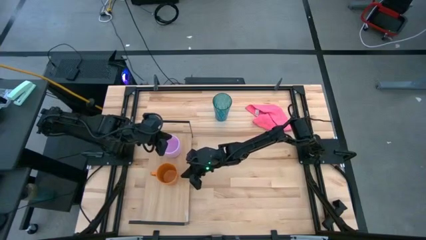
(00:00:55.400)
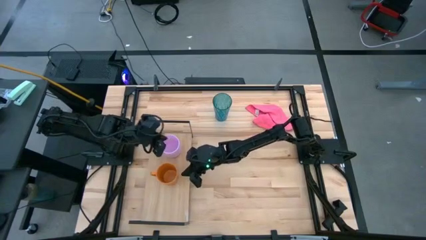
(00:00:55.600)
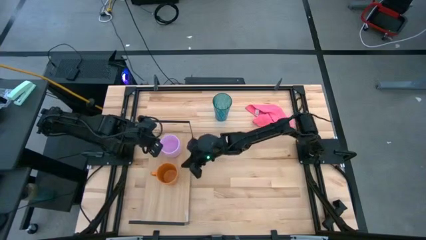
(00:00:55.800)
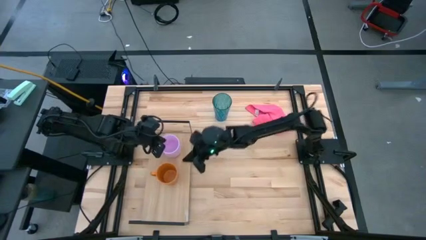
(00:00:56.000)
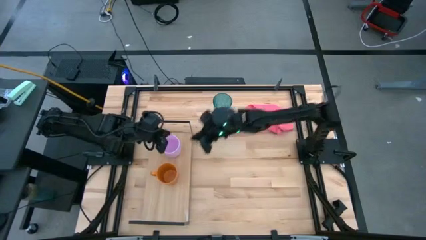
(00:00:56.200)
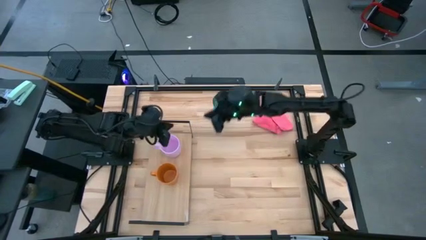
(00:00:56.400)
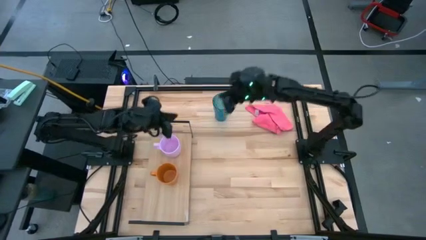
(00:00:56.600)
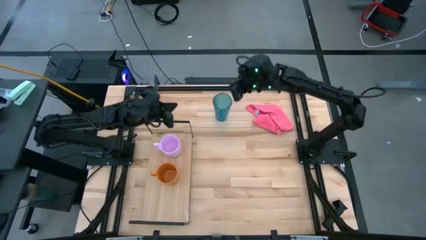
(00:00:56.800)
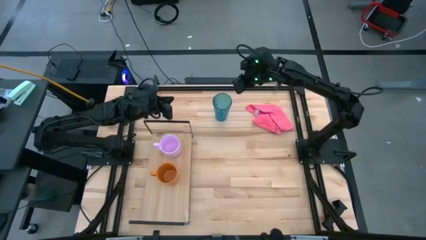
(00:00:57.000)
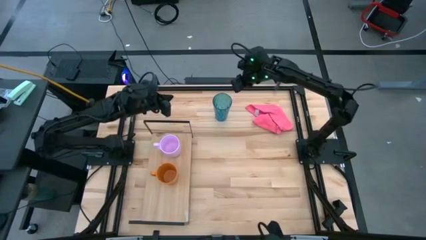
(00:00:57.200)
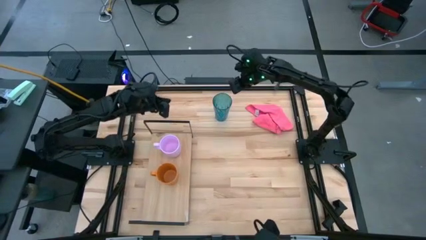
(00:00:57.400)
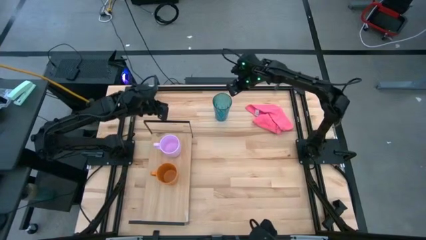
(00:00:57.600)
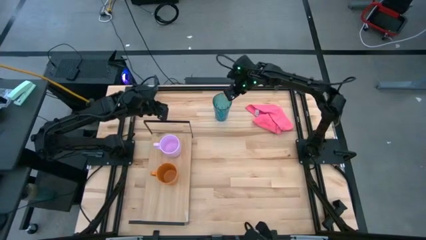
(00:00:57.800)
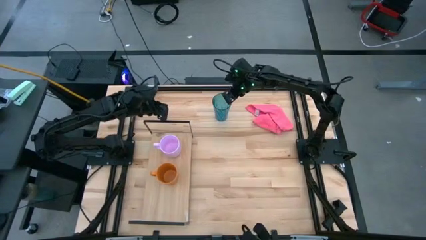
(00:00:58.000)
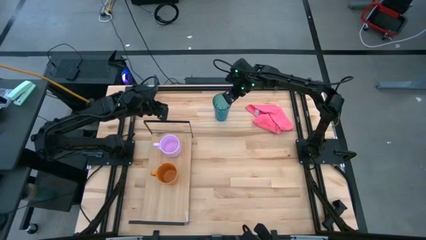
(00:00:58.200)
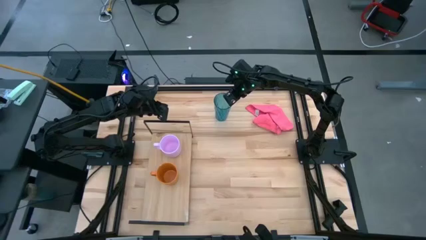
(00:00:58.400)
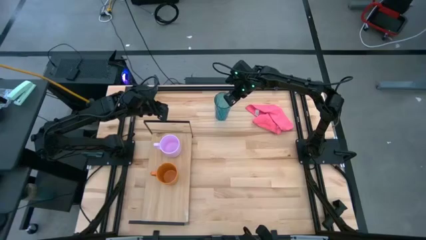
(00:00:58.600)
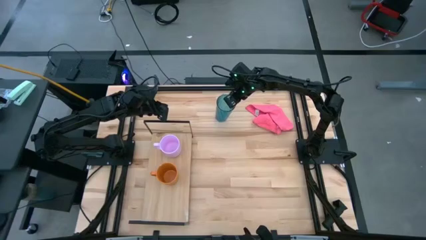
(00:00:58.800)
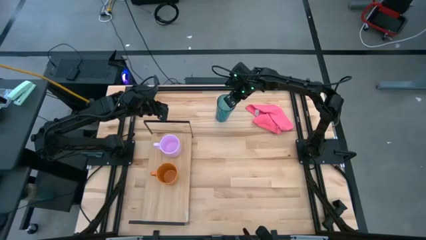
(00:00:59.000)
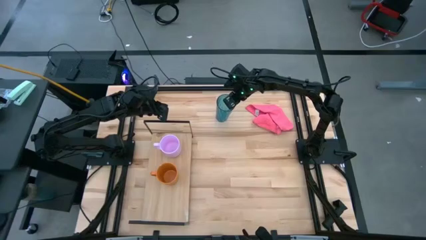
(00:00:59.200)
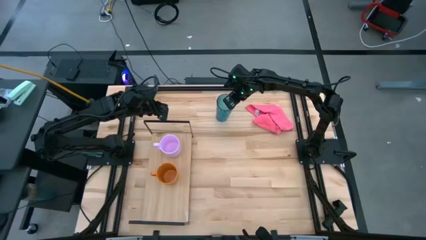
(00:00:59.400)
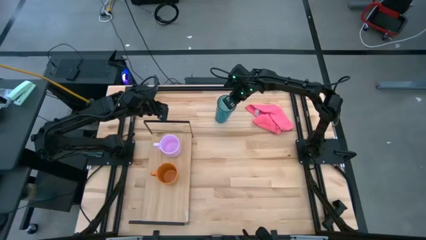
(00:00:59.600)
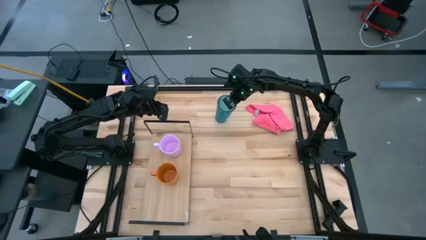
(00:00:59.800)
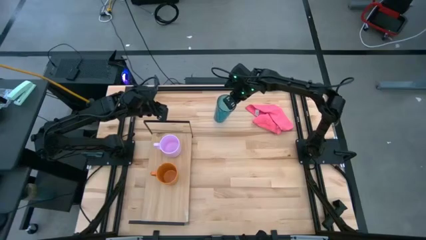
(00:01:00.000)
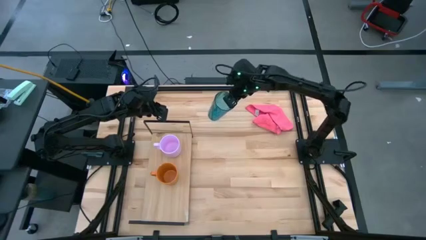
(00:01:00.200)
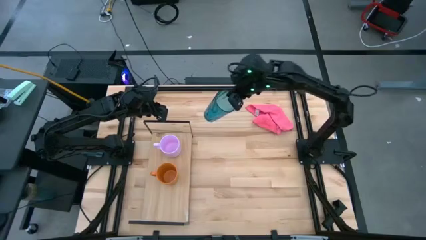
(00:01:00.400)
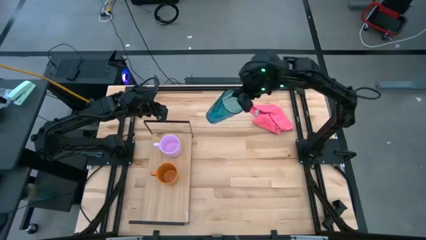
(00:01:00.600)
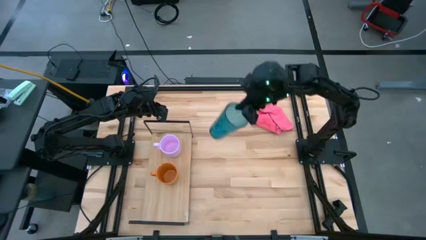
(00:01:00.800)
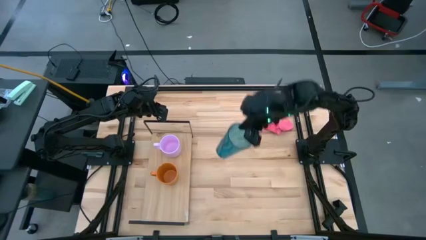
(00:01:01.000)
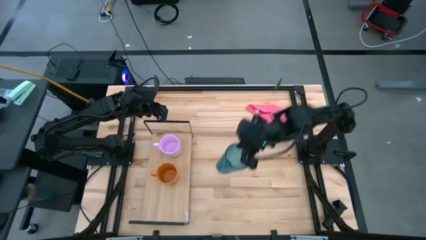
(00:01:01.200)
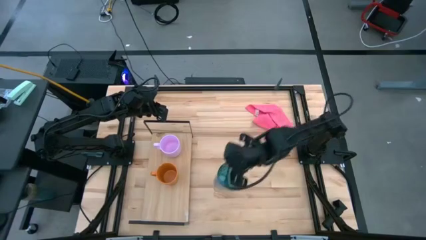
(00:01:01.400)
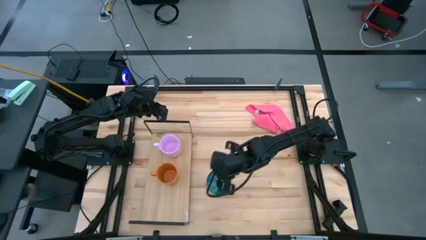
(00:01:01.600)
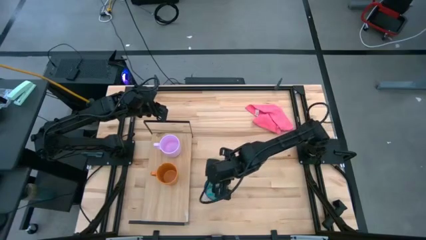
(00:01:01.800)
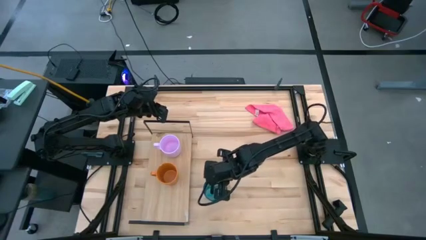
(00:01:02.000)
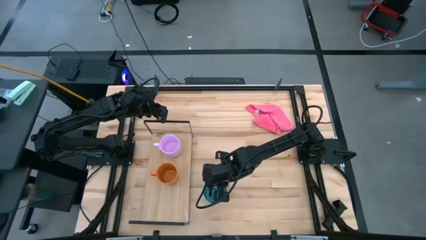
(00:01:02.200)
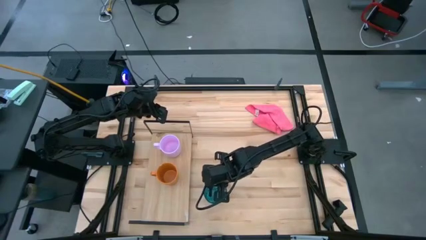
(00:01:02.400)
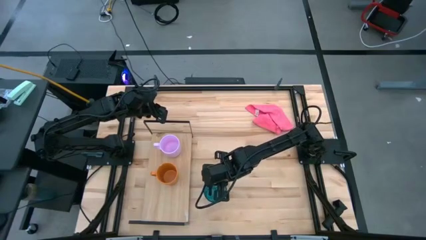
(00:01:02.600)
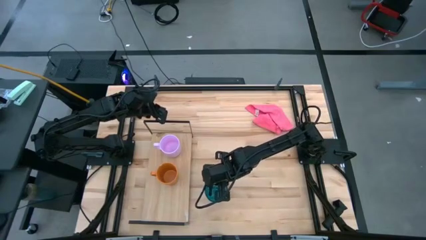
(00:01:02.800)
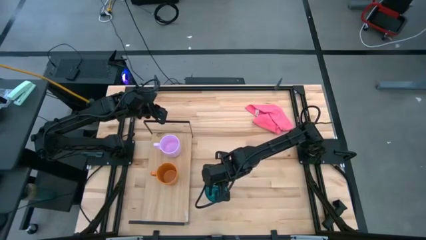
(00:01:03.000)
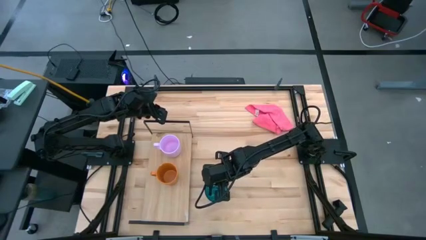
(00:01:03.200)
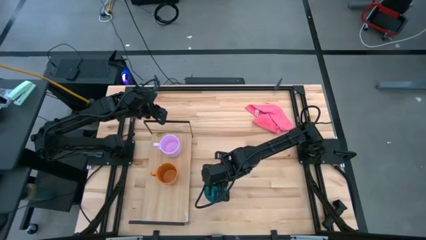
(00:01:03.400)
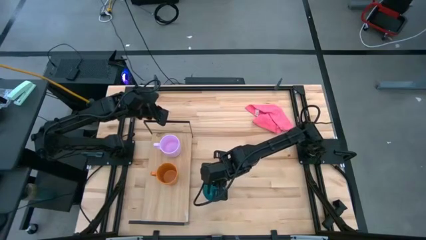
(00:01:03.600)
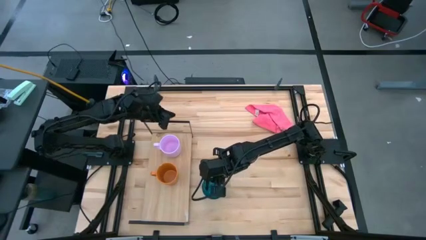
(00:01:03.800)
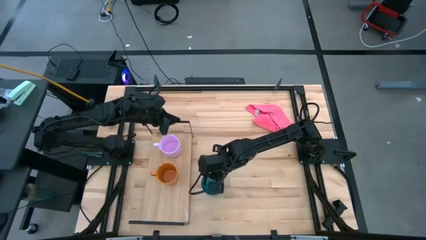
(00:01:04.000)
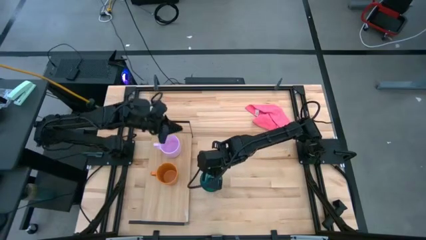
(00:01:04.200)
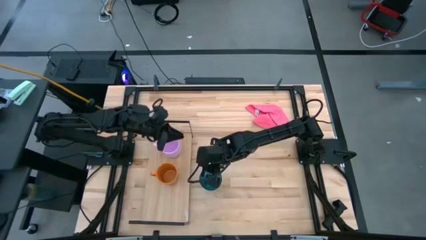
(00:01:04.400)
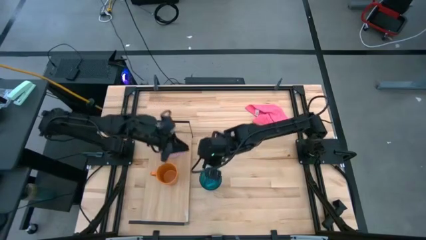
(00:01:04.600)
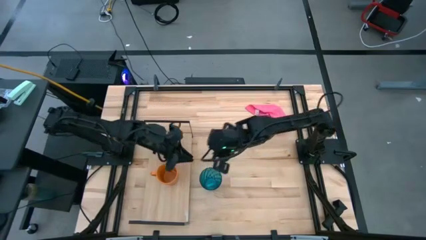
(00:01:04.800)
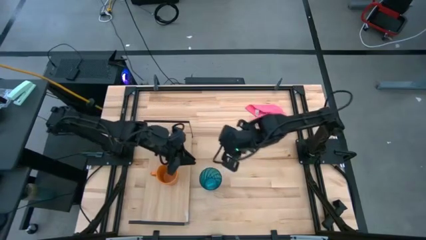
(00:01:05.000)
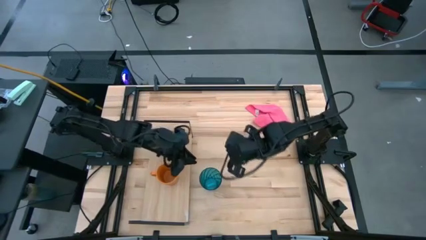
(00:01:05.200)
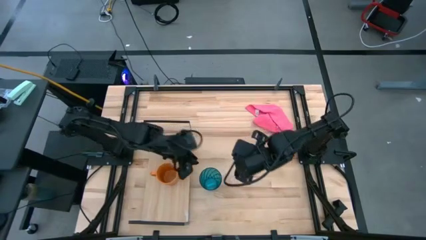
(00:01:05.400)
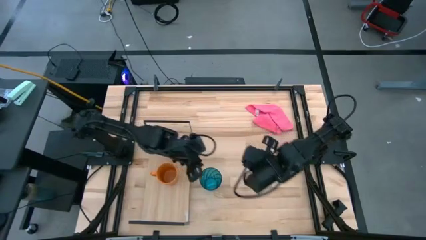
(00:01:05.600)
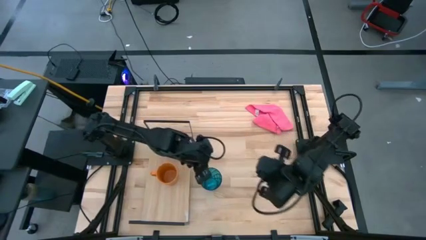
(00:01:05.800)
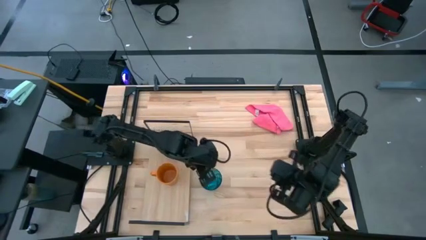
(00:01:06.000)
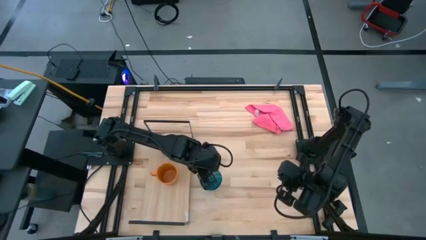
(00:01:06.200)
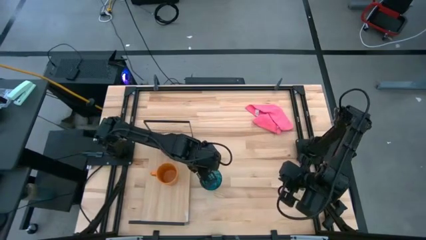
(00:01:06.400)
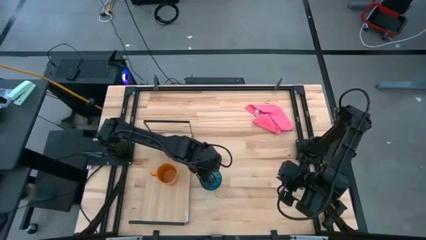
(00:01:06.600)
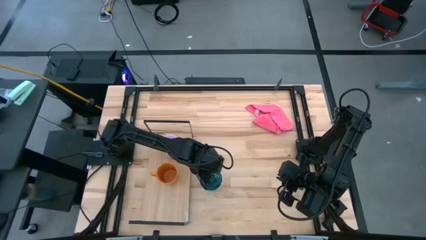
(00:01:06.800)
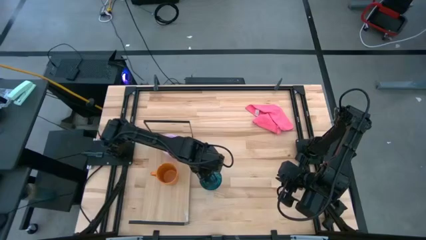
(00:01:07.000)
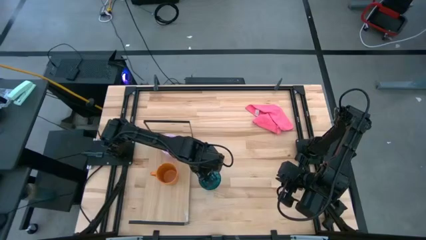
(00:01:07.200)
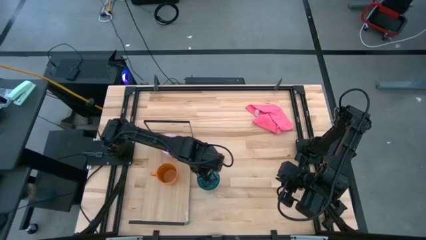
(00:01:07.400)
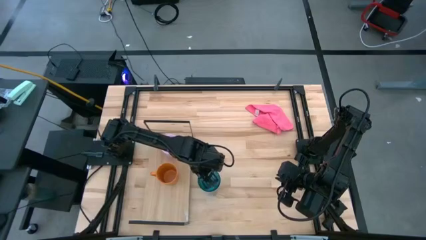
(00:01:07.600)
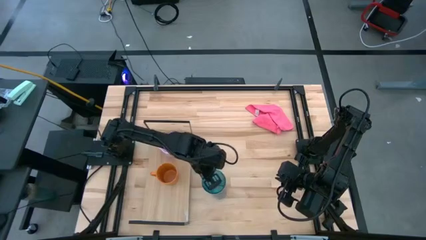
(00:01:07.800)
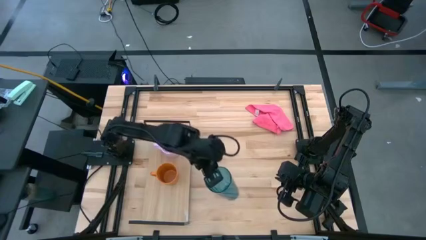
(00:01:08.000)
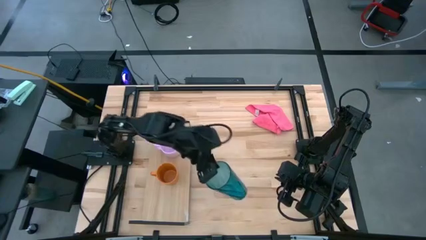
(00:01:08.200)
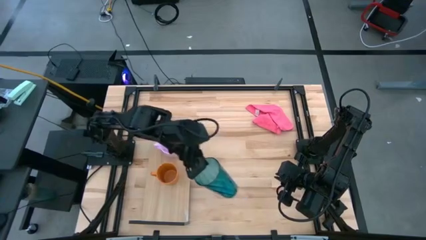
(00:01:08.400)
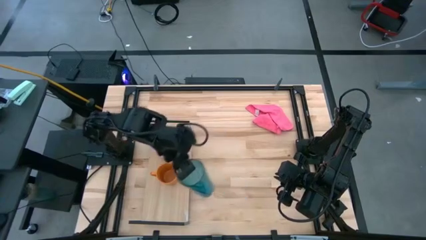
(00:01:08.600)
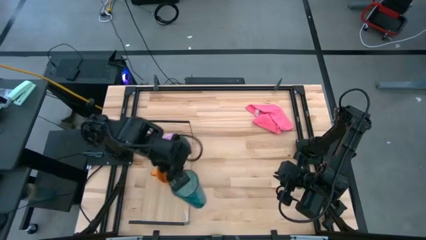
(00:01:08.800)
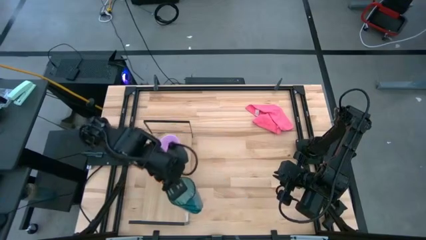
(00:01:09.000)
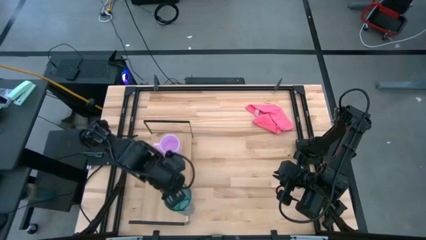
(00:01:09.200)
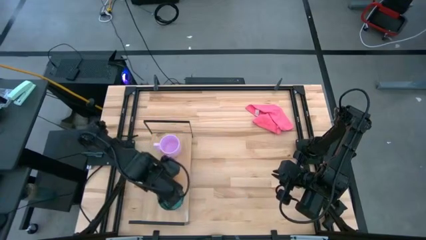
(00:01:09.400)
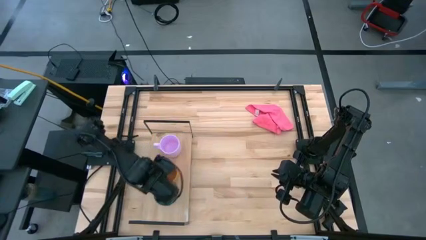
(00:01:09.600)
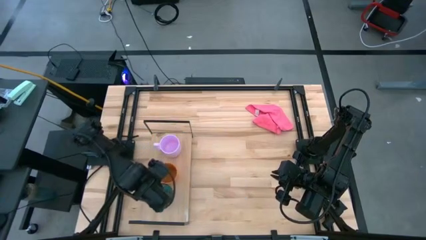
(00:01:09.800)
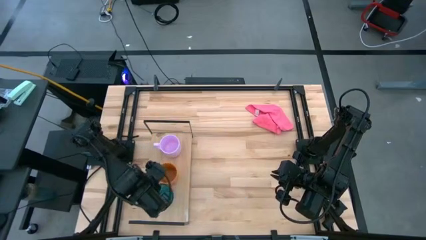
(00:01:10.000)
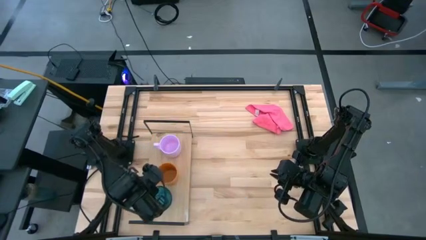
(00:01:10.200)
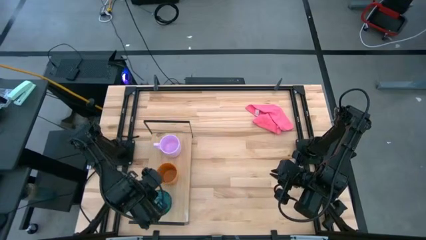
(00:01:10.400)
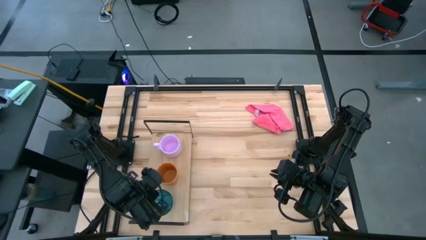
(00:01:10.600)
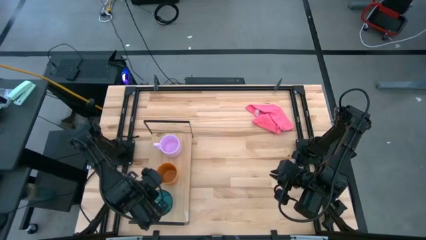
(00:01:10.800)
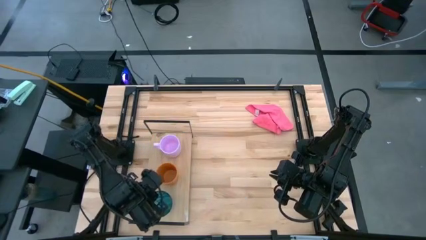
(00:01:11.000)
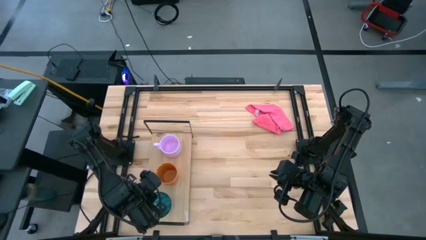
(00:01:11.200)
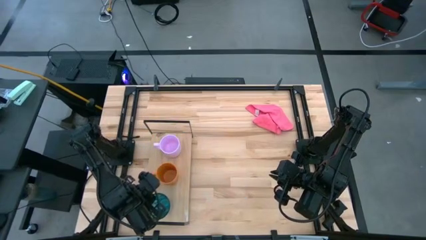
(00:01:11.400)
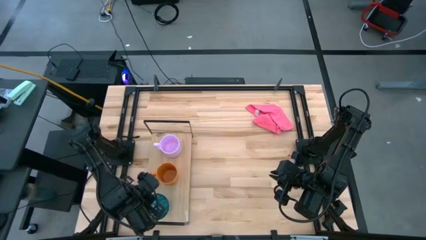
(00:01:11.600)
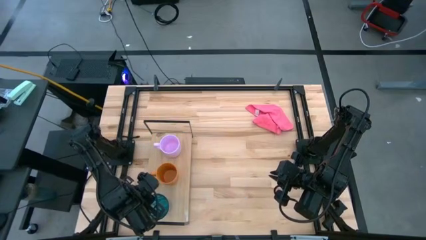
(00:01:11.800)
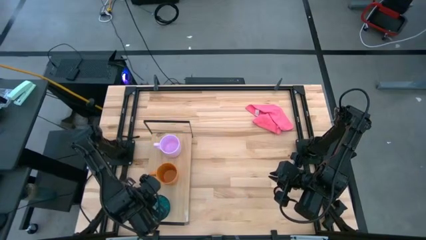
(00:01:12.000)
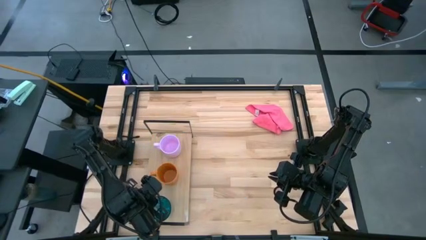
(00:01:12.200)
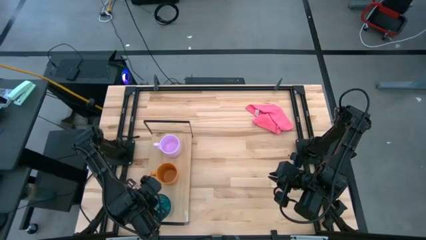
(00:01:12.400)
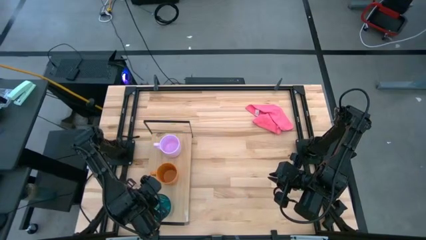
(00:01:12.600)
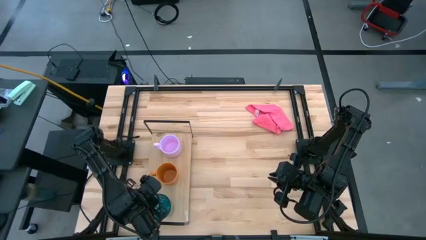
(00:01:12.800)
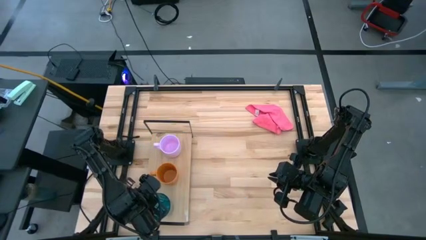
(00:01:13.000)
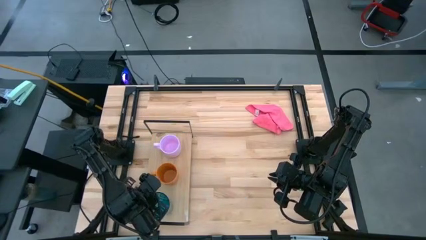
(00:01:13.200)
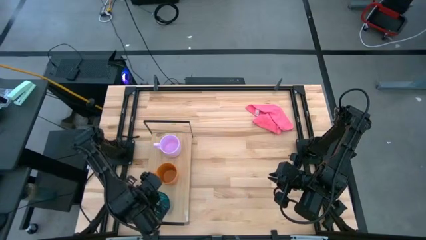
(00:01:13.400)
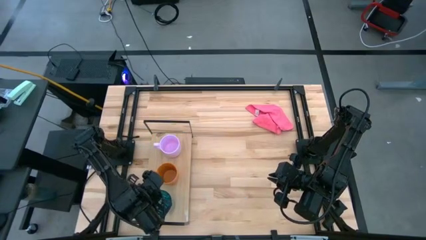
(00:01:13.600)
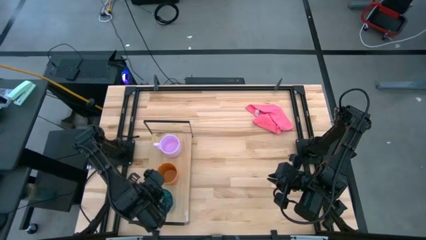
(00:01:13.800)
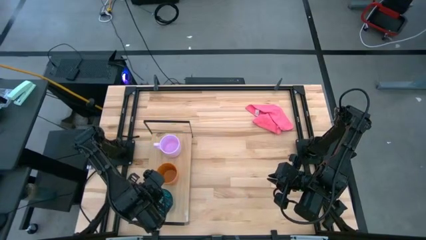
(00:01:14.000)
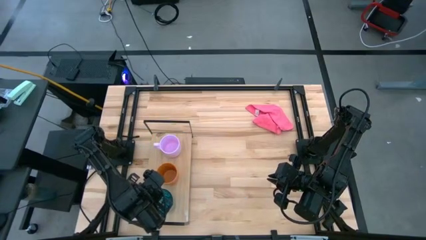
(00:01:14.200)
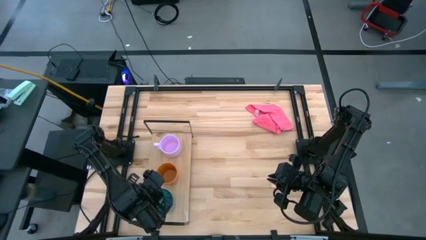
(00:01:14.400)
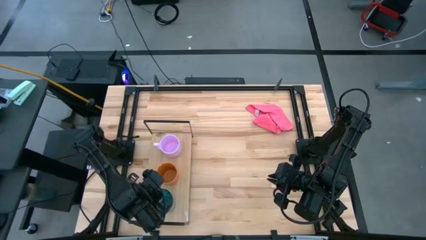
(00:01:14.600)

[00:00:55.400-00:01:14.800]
Task: Stack small to large cups/mugs on shelf
Put the blue cup on the shelf
